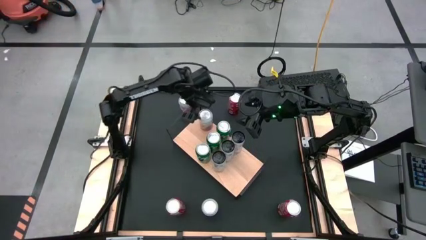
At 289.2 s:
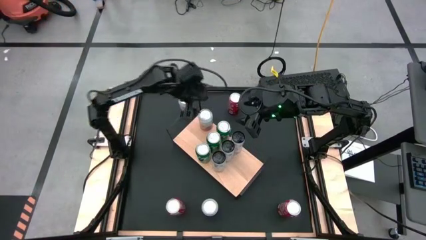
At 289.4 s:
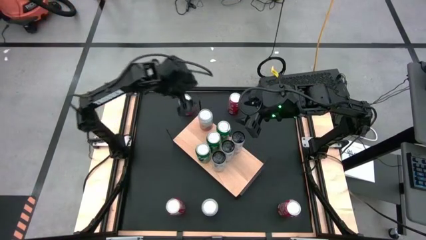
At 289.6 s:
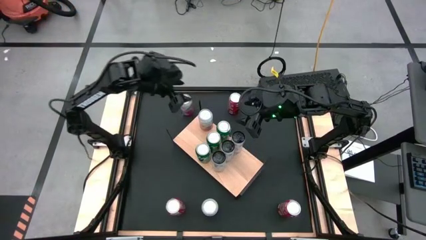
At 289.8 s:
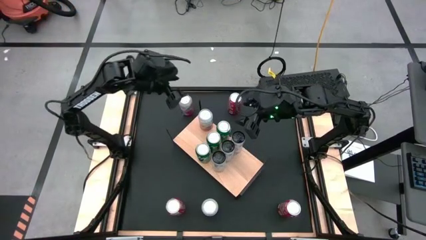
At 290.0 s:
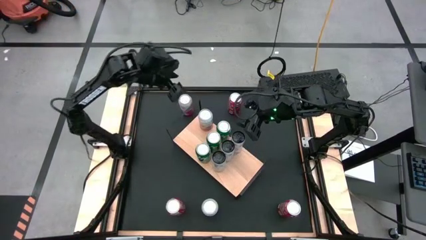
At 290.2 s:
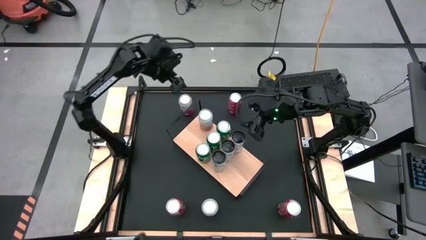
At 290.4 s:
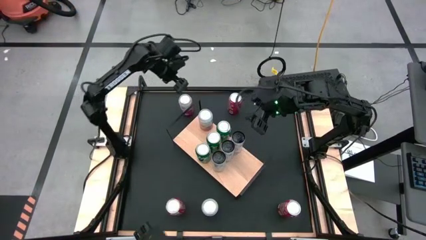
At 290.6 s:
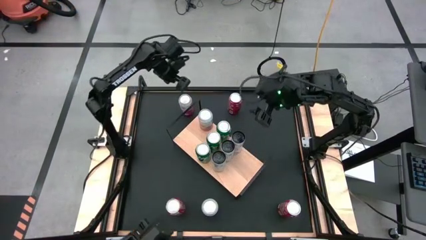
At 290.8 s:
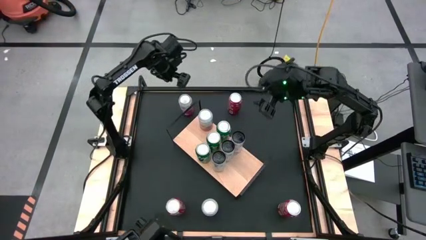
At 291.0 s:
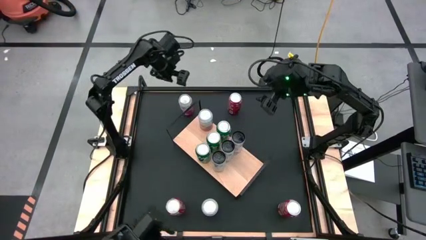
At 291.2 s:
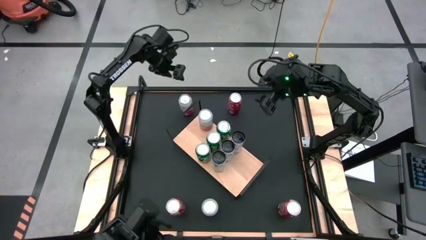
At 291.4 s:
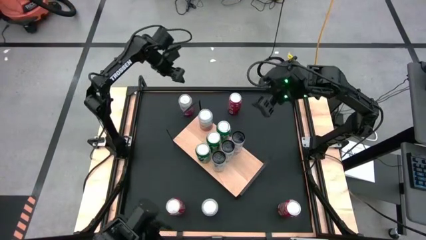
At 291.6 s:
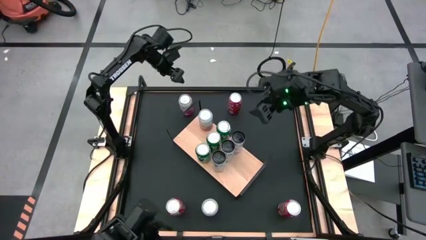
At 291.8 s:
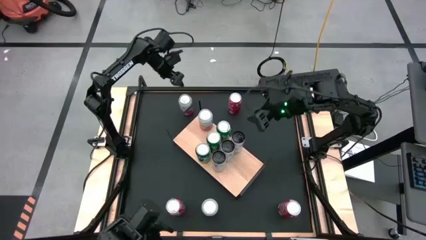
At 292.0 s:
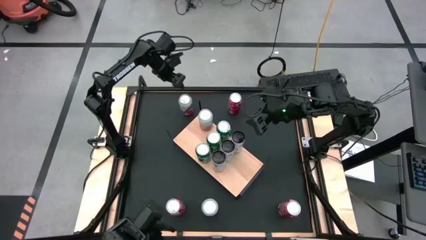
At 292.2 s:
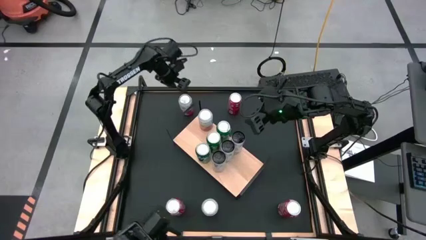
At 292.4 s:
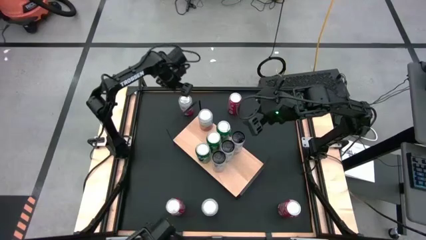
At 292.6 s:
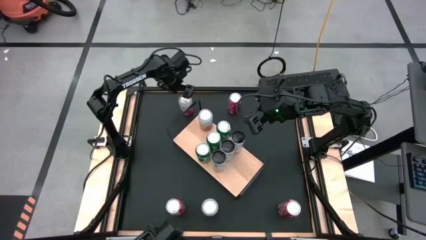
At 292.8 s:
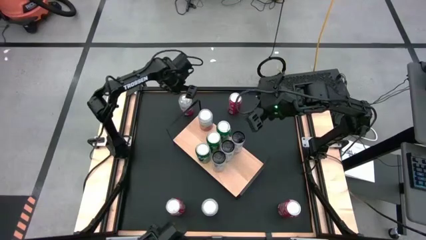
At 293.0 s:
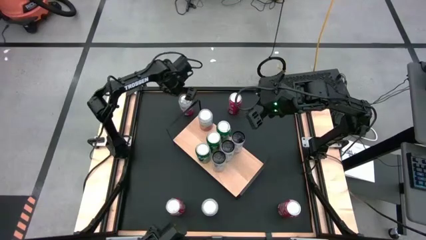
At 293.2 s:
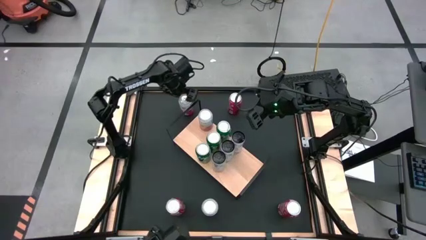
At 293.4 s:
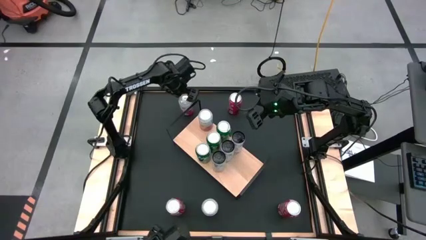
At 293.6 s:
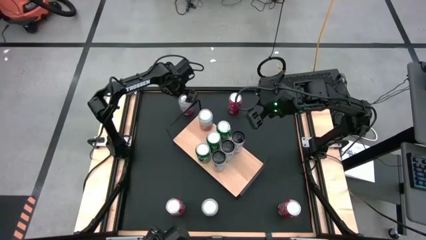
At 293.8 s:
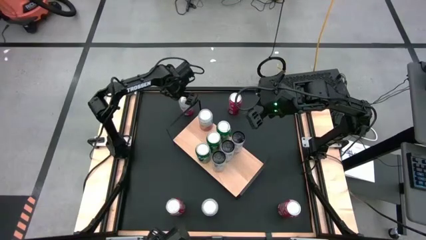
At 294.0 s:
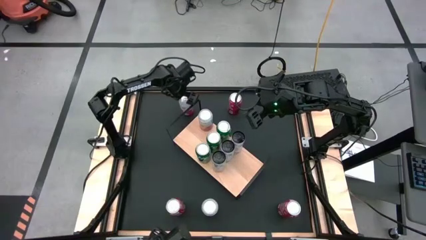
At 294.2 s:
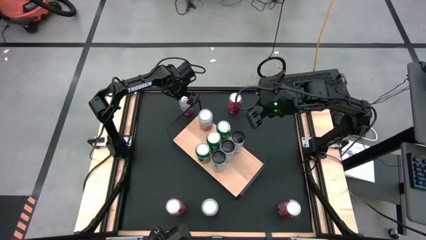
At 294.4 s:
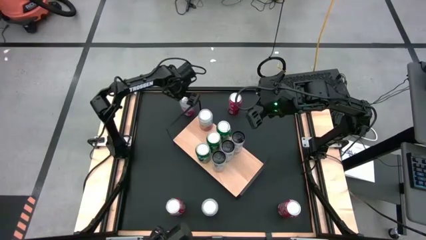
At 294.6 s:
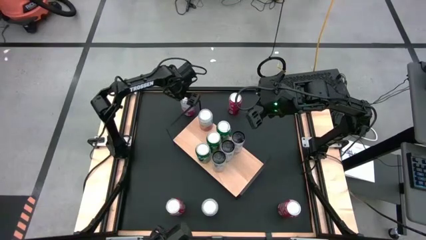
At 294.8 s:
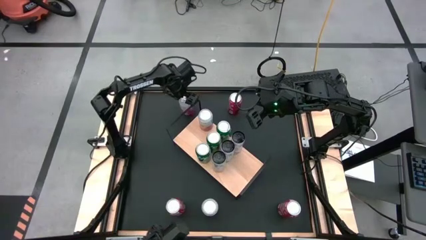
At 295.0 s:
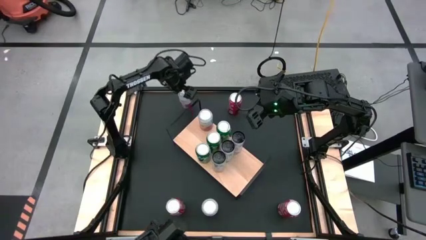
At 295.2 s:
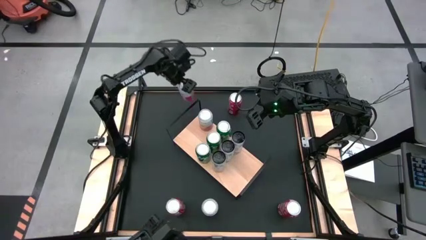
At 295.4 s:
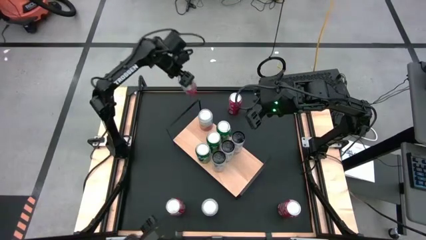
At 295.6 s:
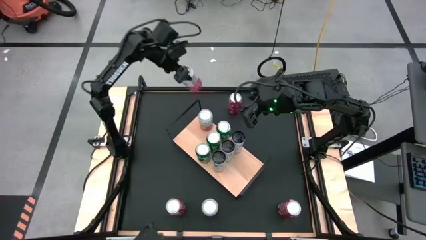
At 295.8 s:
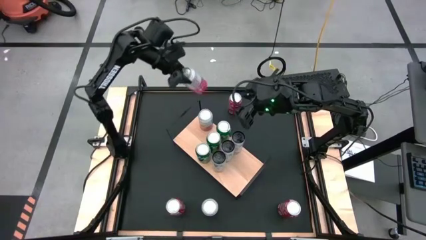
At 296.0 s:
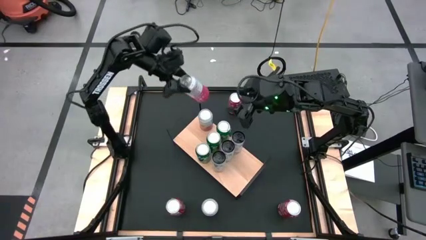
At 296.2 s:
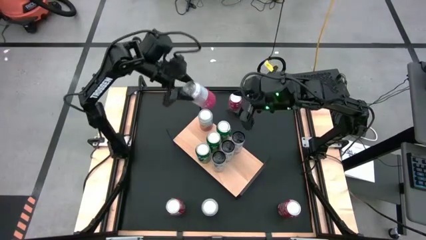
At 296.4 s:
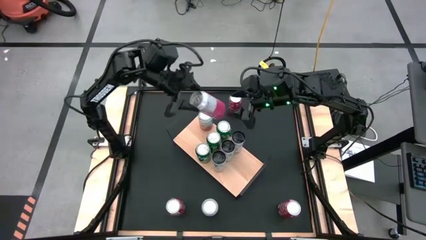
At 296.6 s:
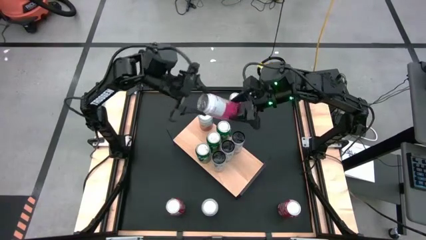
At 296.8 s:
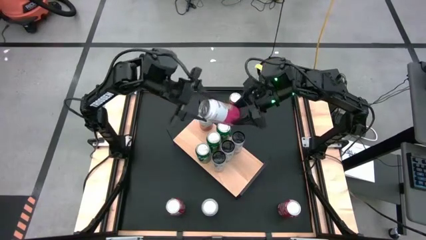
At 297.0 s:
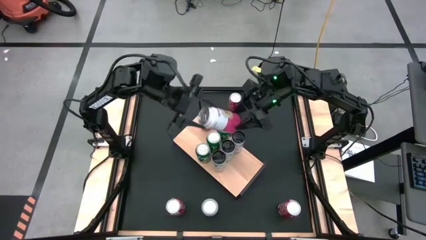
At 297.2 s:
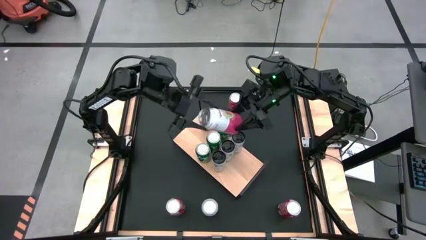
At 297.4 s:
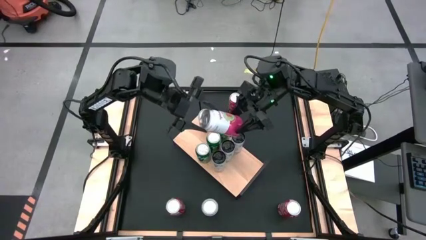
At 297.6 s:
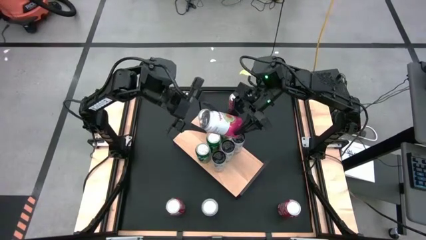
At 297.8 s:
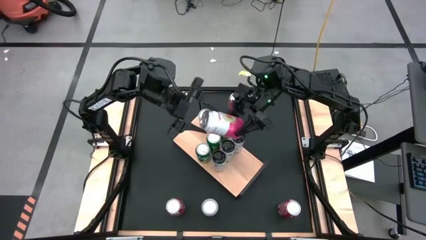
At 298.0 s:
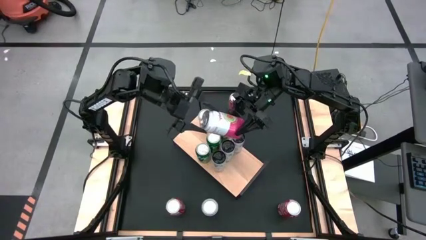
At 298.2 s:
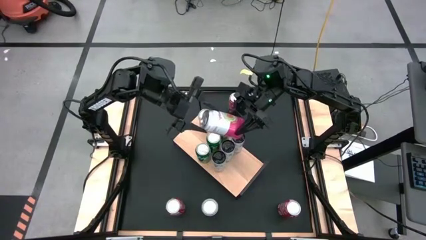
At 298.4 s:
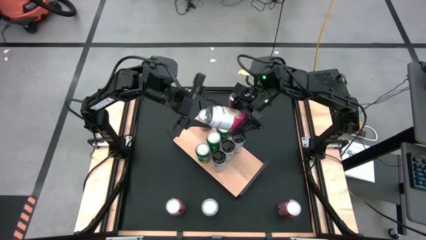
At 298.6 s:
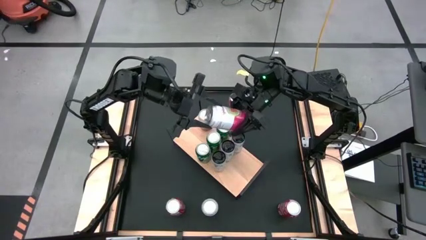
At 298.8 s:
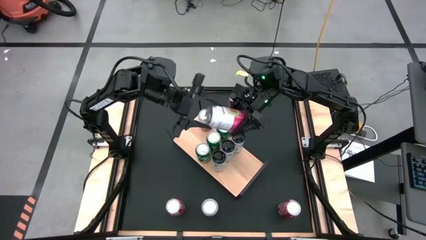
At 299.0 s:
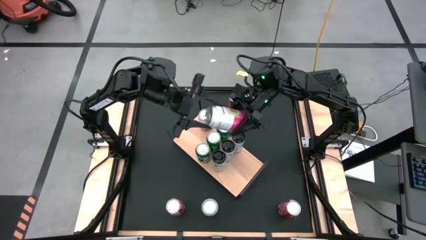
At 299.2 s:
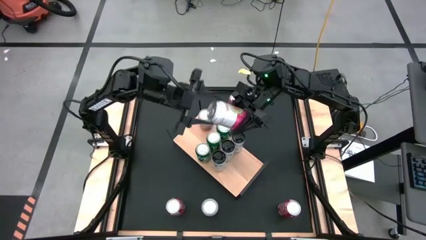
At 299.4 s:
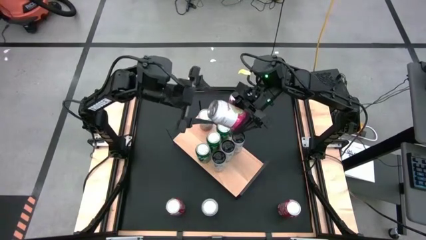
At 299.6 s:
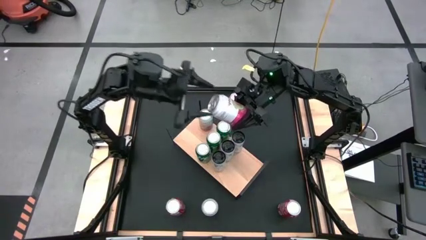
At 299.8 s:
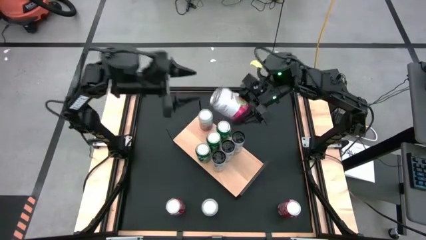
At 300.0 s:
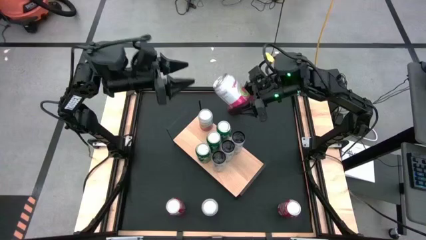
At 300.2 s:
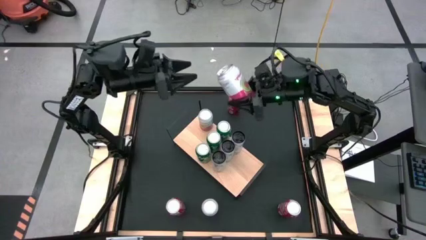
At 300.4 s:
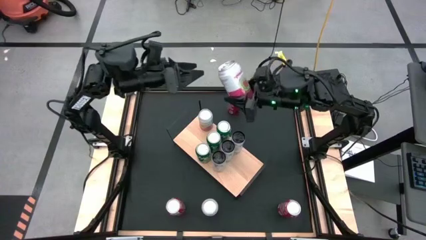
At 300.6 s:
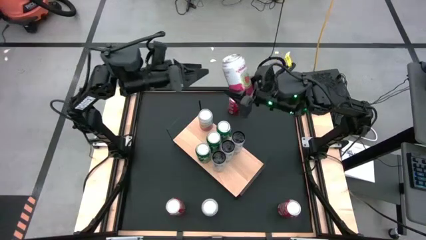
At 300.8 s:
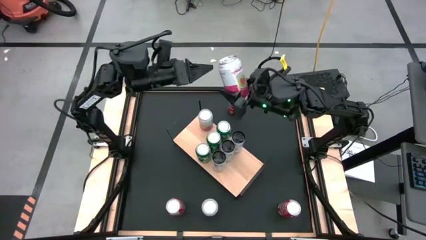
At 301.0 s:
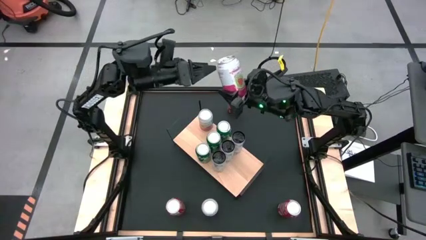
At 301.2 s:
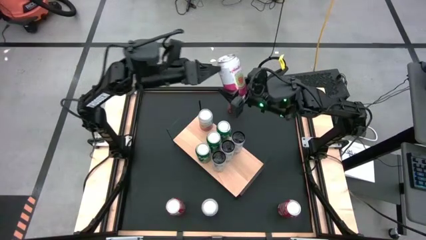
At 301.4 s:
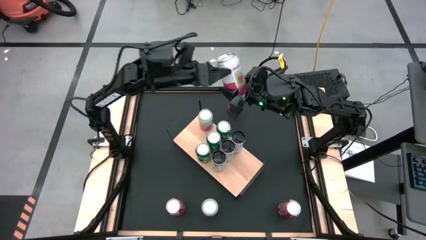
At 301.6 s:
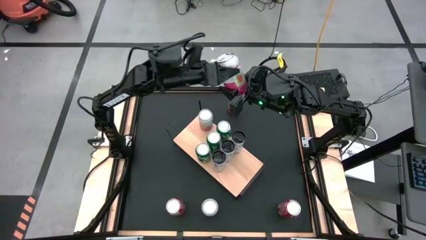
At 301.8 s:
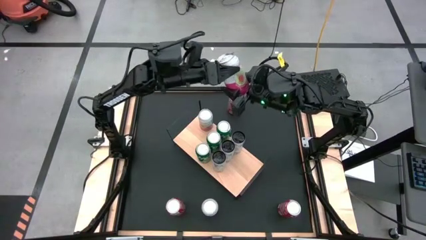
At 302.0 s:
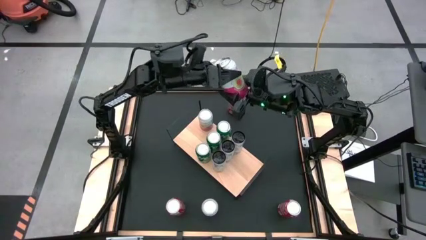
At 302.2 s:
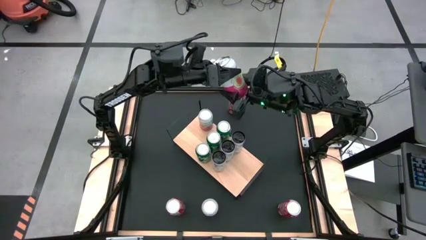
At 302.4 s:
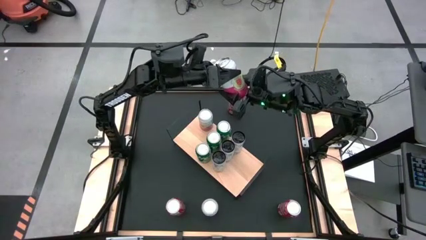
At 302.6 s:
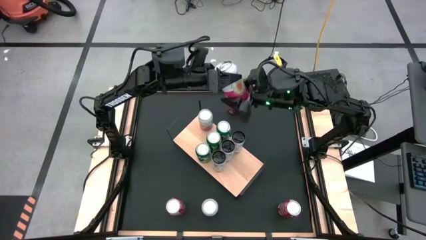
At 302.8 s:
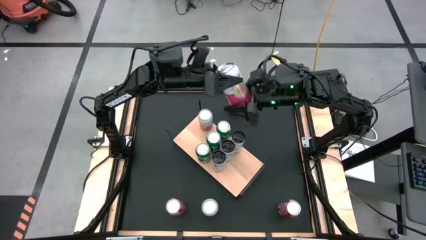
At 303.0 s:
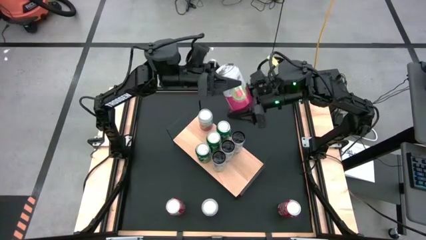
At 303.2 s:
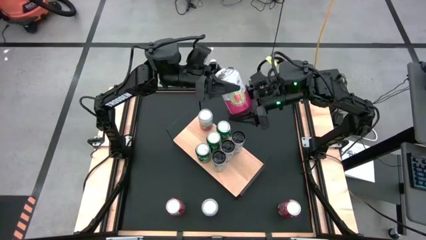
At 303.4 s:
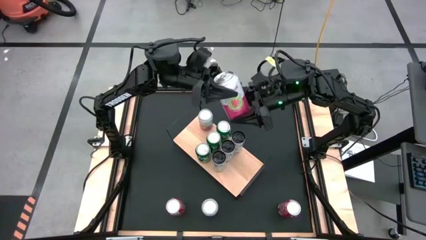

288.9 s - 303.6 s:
Task: Place canned beverage on shelf
Put the top white and pink soda can aligned with the other white and pink soda can
